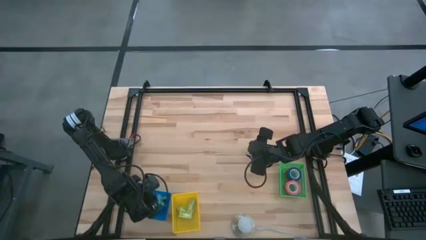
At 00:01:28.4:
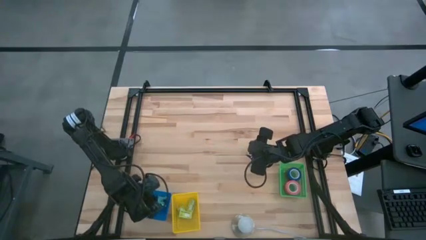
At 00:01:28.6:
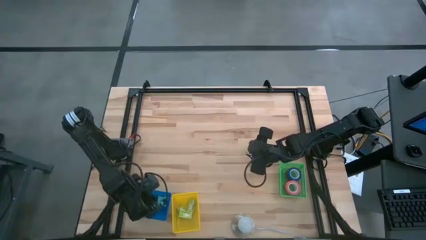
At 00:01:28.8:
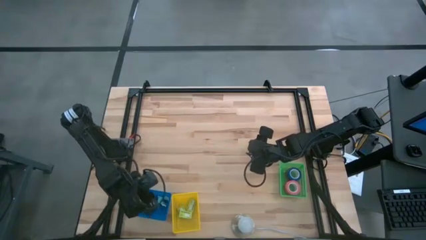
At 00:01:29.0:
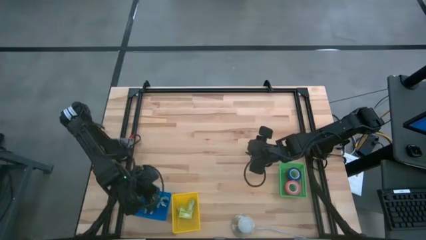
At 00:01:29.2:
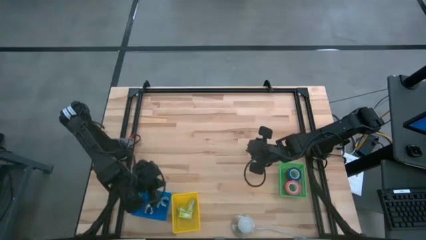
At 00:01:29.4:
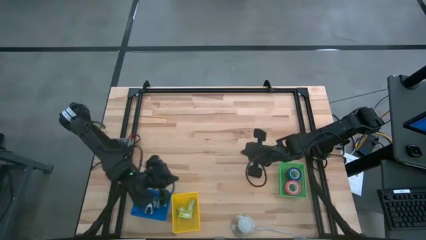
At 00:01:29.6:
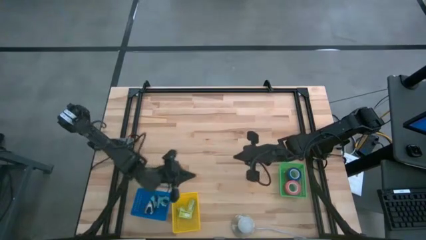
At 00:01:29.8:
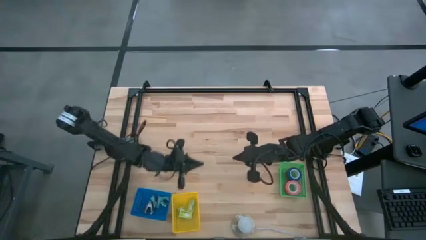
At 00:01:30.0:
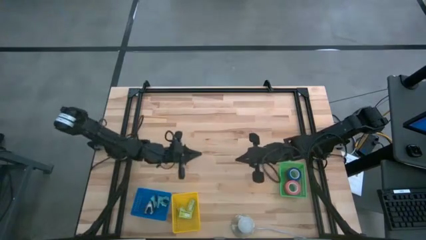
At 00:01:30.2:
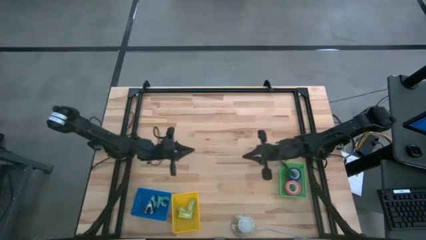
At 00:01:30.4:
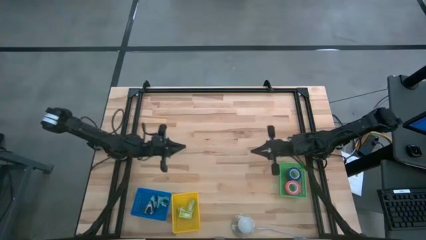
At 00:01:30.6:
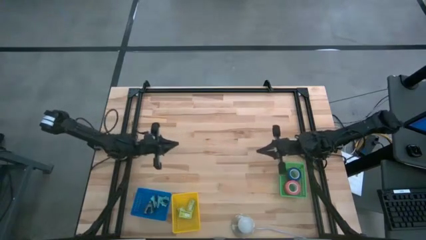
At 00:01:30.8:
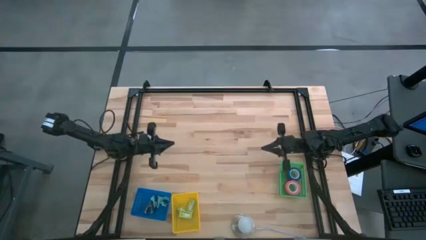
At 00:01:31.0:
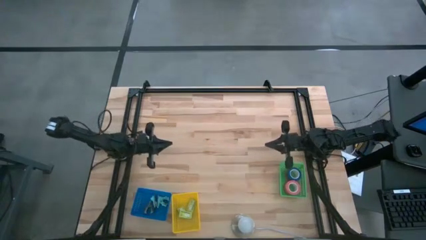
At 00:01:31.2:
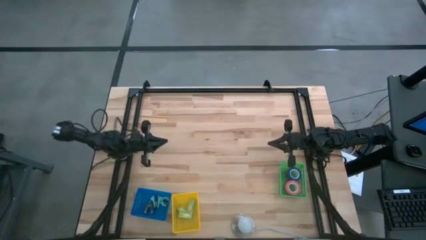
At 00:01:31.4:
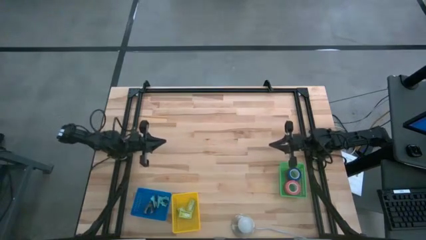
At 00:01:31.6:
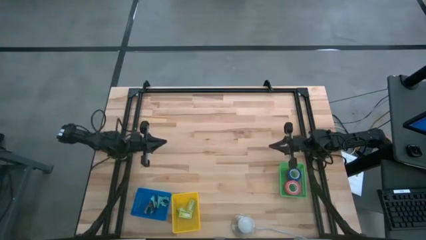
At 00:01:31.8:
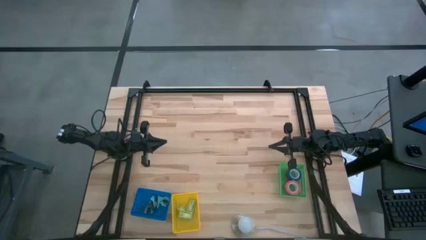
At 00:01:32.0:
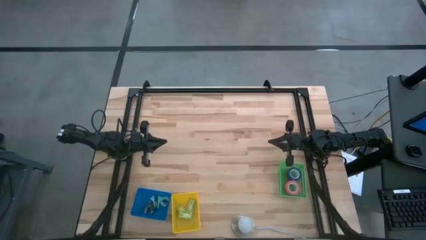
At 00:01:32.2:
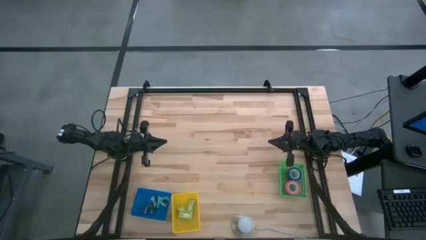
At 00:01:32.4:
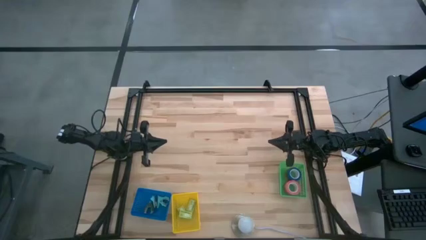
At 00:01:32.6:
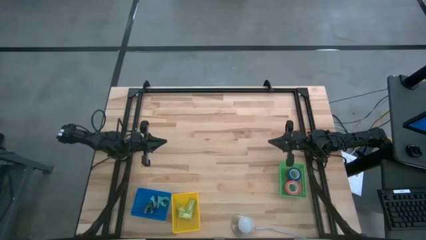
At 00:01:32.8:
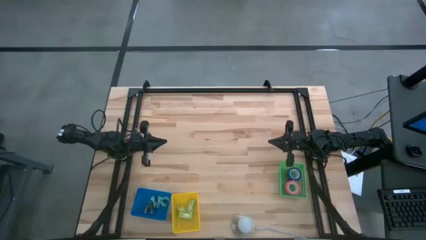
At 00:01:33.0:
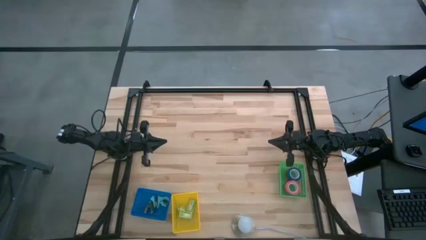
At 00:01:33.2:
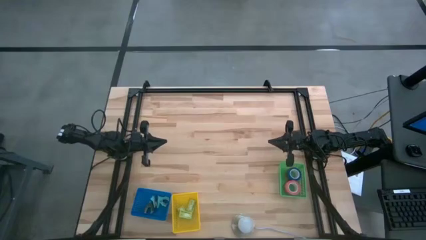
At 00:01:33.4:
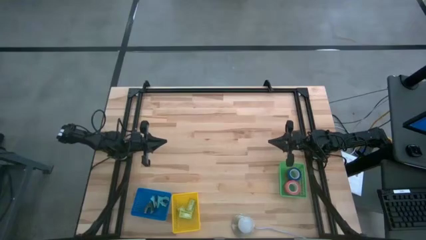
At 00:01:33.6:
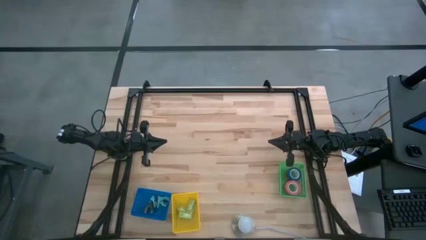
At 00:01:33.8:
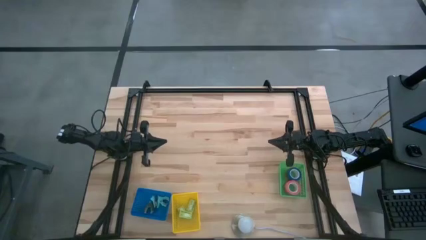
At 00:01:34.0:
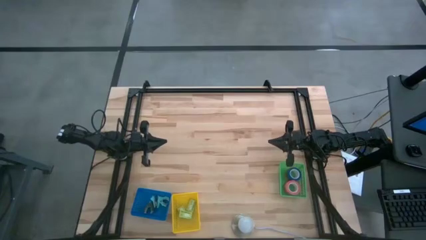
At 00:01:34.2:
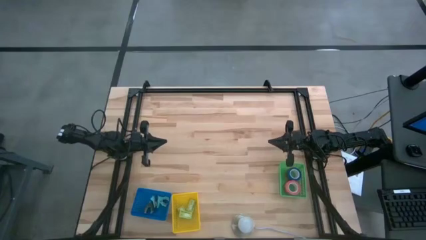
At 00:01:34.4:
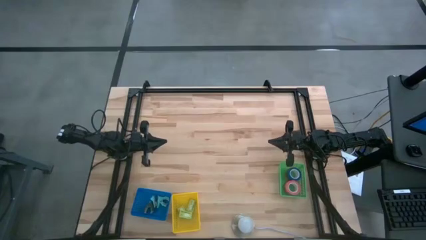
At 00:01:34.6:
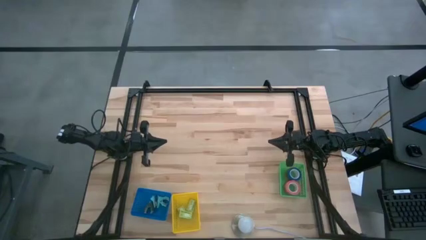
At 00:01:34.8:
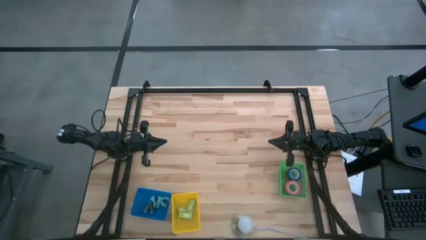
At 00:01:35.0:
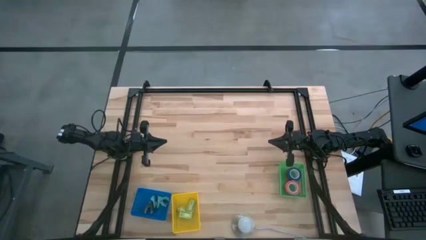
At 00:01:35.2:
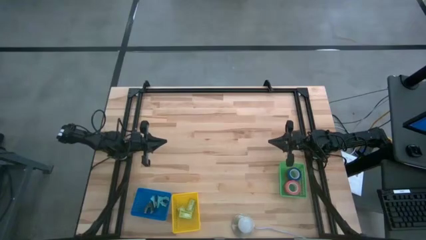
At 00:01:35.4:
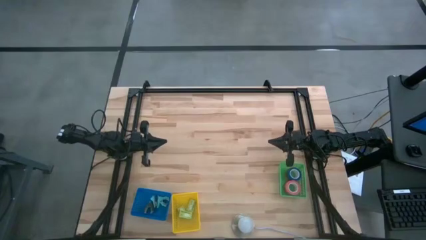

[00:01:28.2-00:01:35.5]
Task: Pick and place Stapler, Stapler remover, tape
Return to Home Position

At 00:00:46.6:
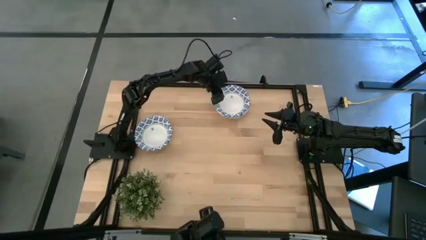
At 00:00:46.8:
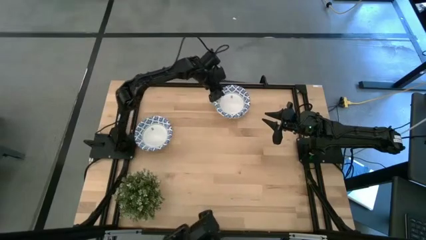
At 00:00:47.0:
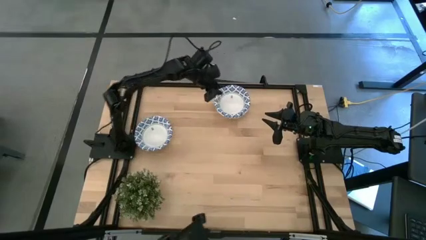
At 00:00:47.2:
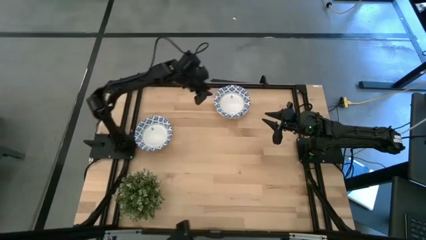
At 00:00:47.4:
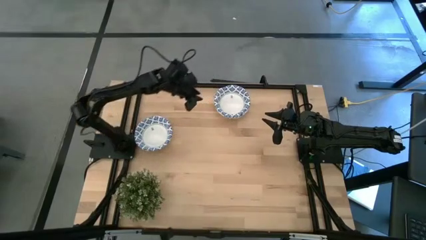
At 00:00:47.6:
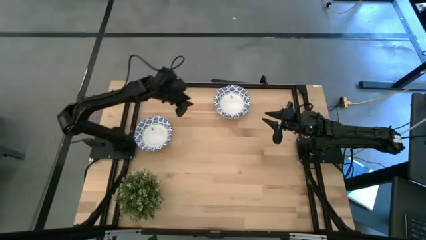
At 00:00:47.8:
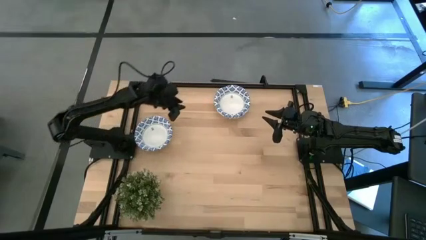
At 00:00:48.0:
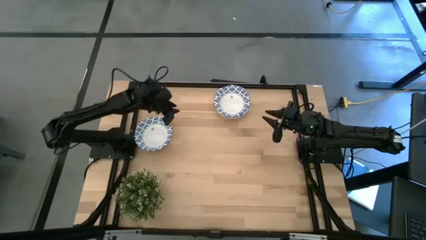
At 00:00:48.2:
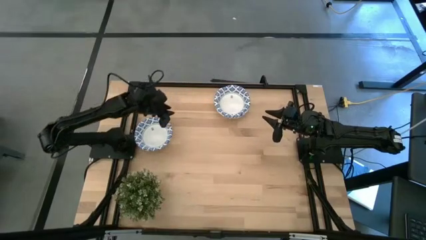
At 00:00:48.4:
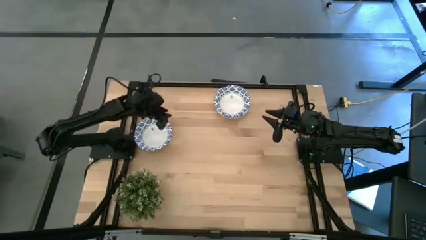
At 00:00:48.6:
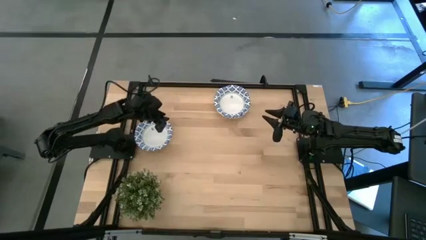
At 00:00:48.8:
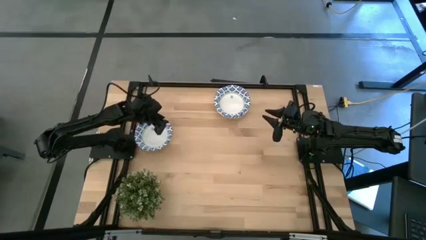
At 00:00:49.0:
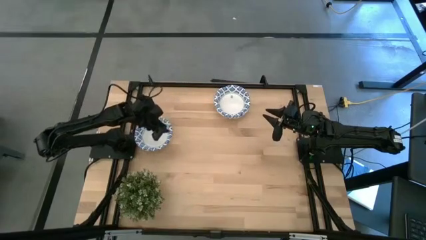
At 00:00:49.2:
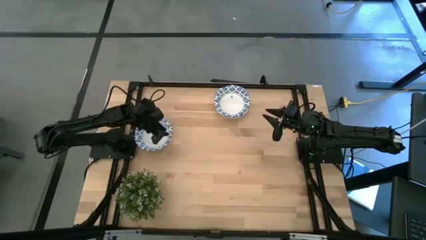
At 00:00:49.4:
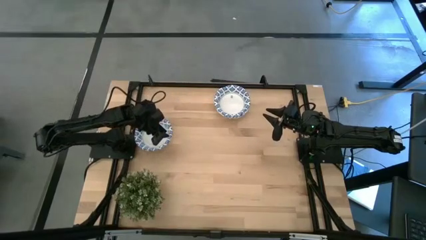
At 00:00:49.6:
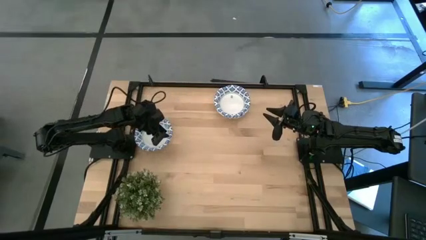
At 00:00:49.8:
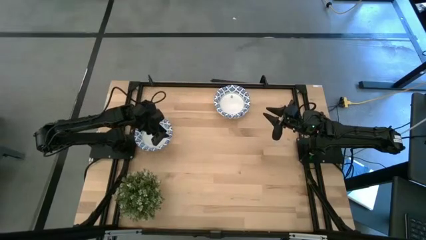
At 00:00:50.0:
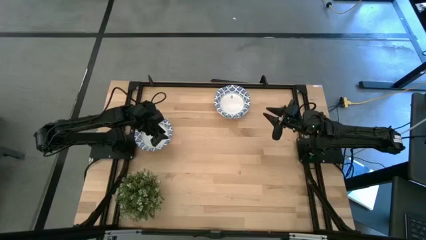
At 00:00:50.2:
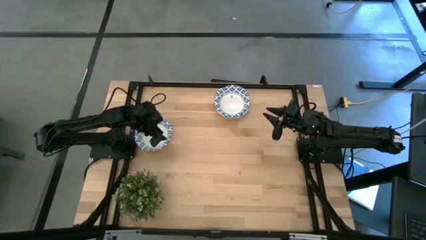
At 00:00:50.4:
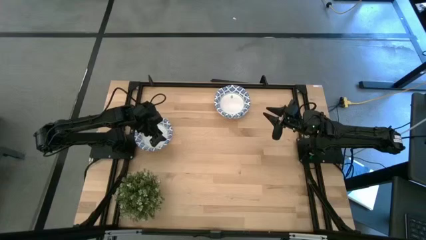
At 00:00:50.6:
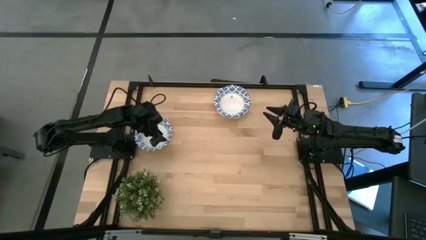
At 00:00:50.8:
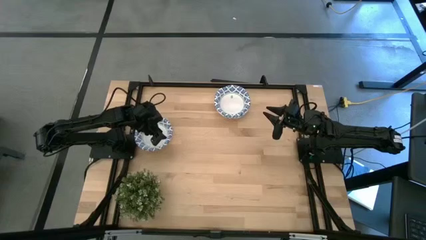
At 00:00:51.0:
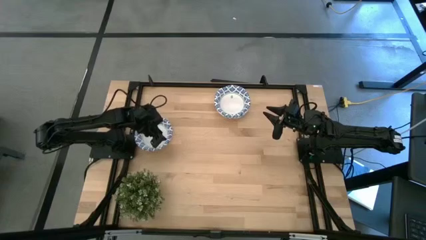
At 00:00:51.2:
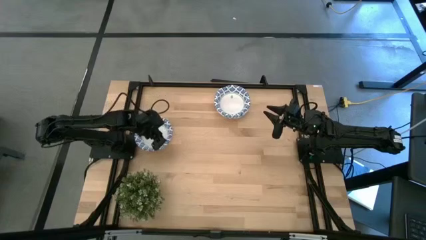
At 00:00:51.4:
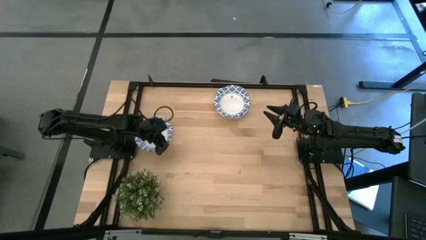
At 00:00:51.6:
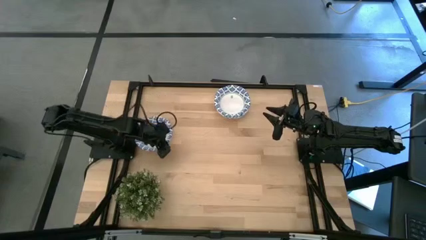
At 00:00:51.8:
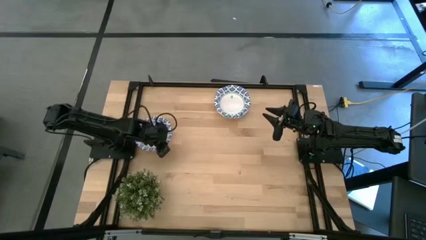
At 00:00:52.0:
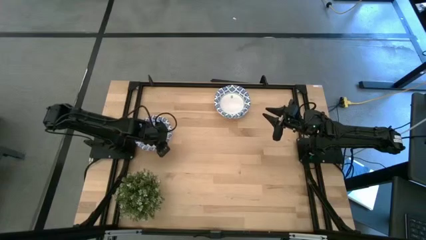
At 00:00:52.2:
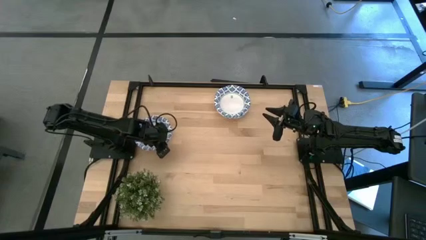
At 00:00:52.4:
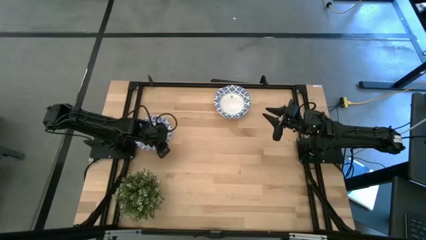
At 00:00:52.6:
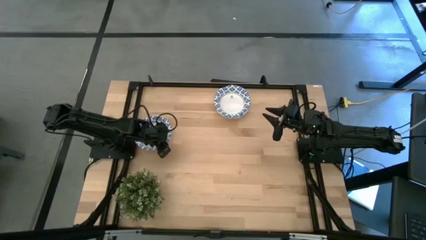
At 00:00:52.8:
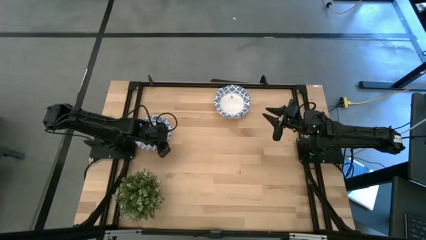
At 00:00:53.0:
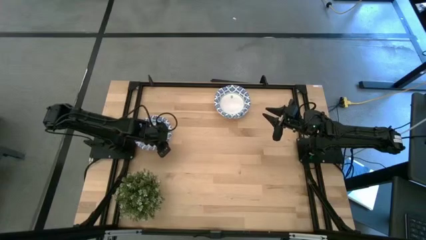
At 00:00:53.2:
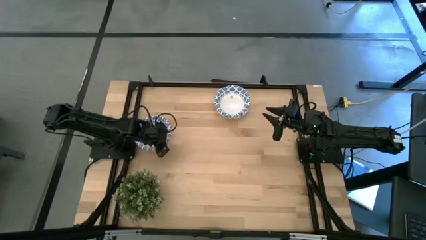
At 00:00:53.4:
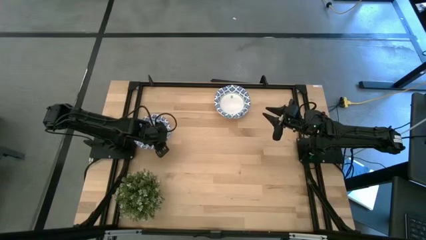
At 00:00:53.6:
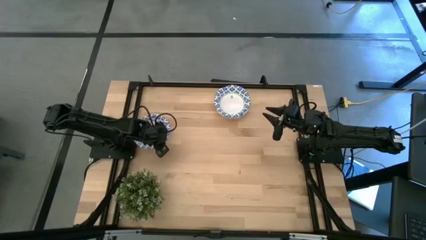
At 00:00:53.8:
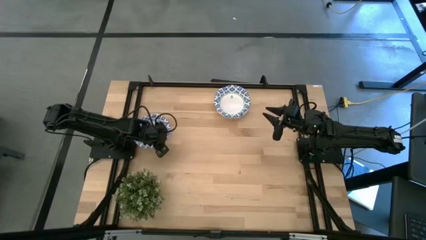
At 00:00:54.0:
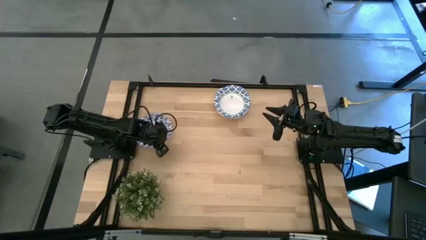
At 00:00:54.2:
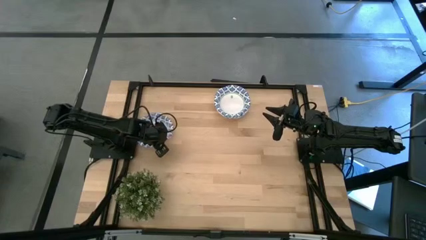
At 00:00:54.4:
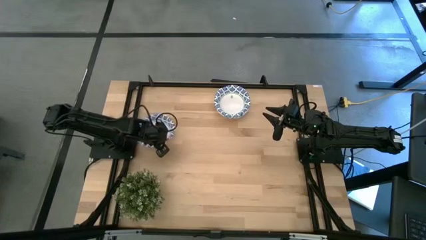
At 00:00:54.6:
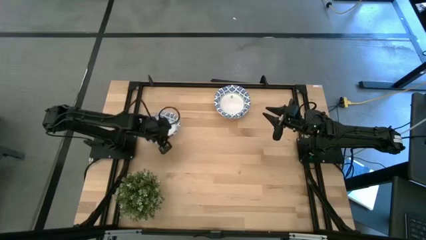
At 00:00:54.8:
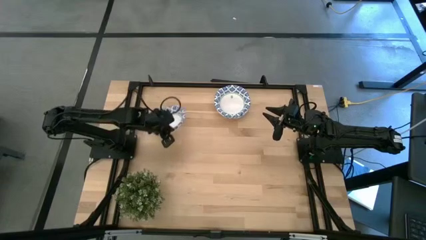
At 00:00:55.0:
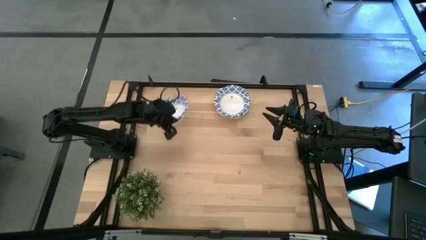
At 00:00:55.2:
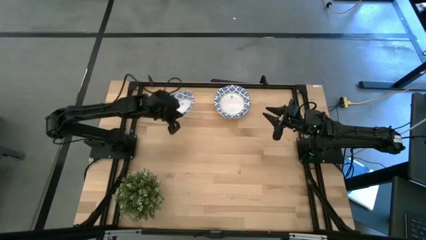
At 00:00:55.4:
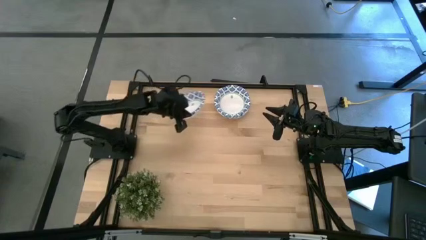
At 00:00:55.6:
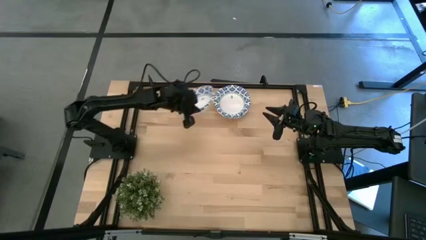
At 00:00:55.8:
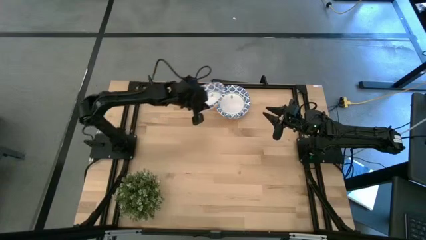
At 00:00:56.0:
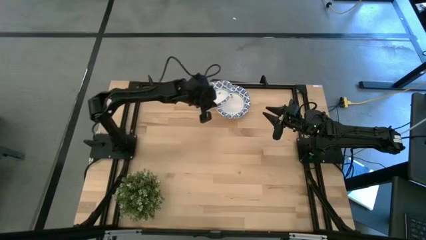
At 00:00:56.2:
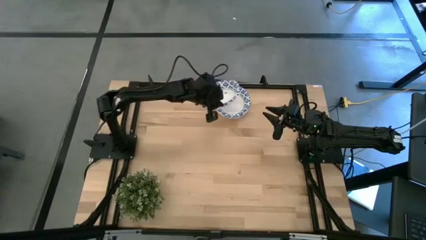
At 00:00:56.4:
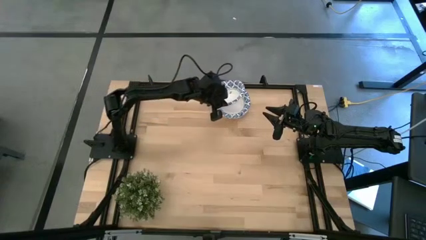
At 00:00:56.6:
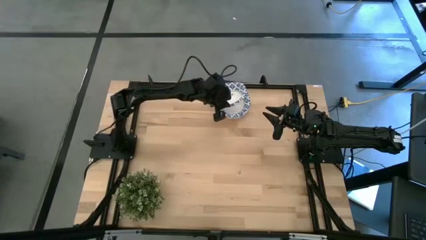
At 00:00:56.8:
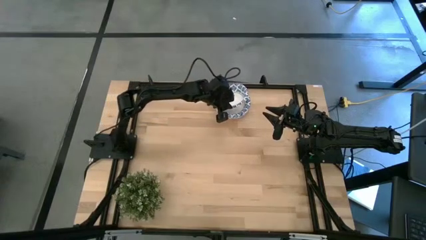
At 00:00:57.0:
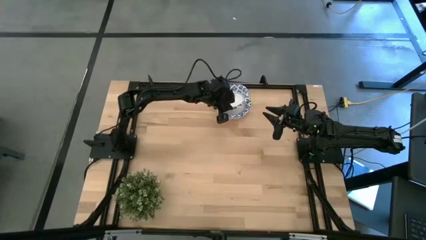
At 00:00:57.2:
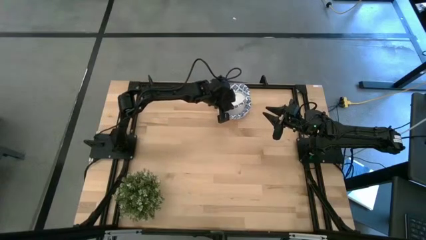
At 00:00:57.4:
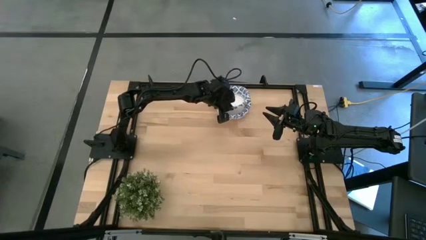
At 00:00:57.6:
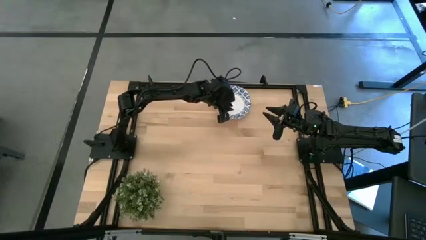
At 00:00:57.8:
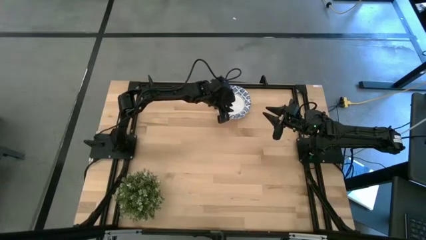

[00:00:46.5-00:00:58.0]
Task: Nest bowls inside each other
Stack the left bowl on the right bowls
